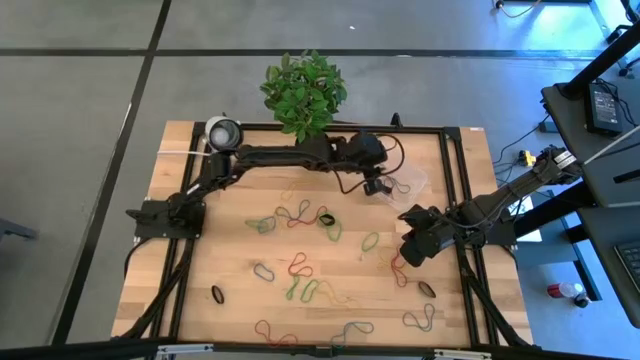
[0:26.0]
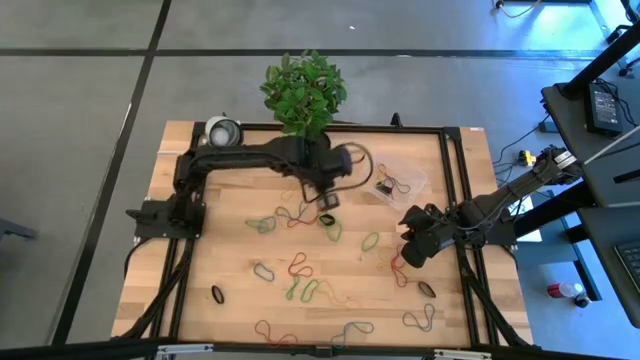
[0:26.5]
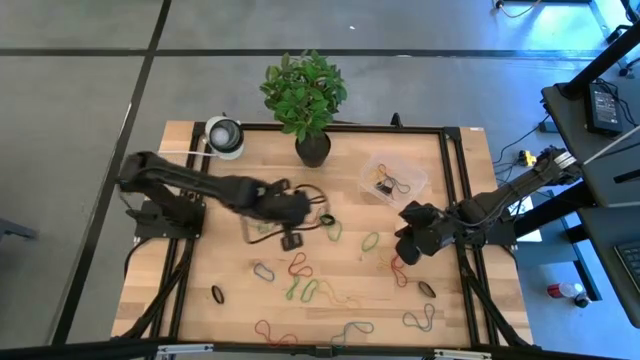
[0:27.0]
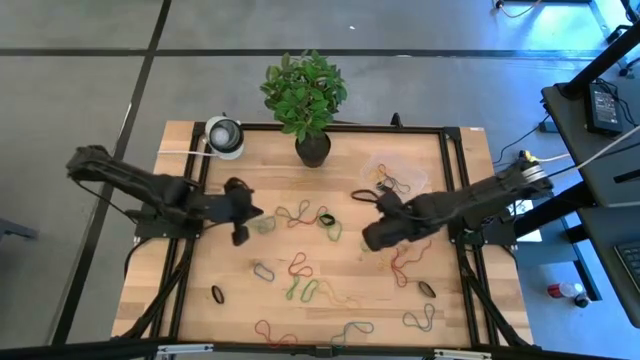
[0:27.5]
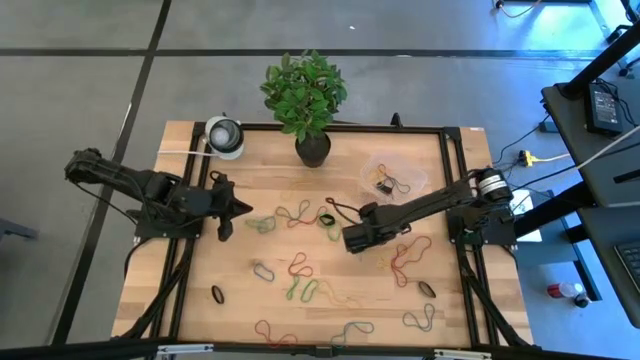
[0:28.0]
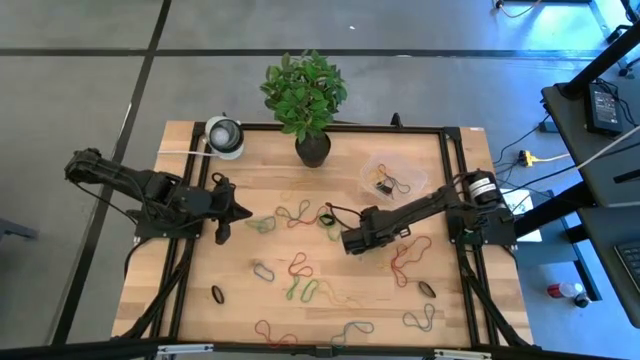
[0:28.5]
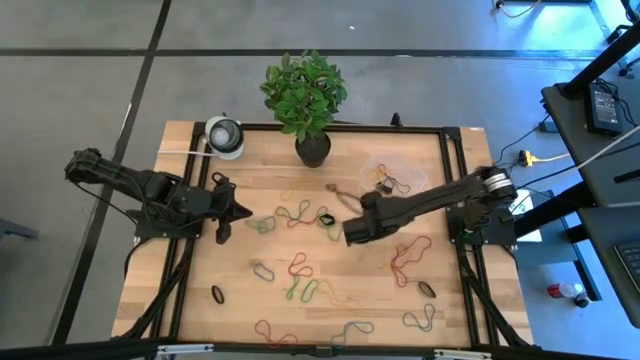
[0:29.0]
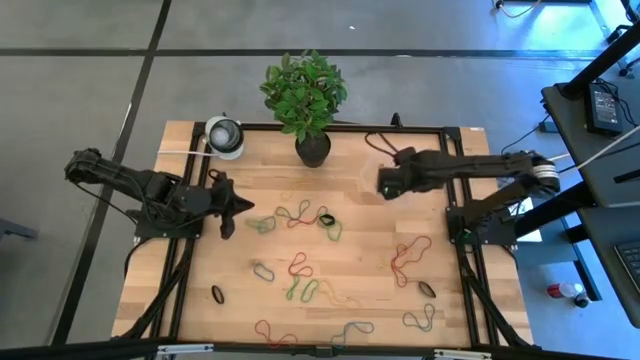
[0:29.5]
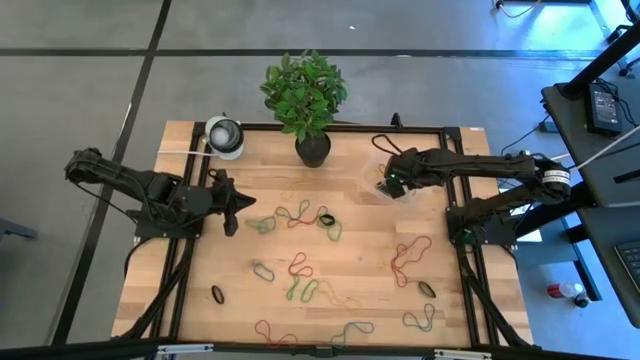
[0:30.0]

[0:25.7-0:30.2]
Task: Pick and place rubber bands into bin
Put the green rubber band into the bin

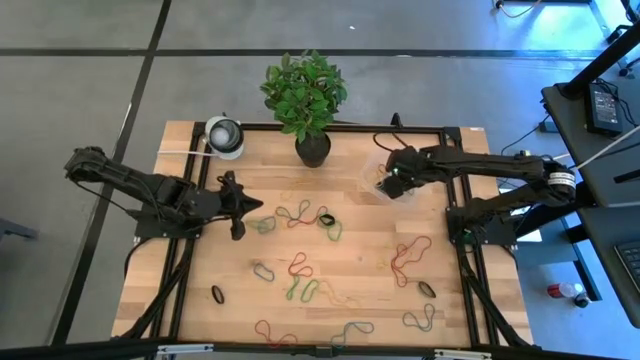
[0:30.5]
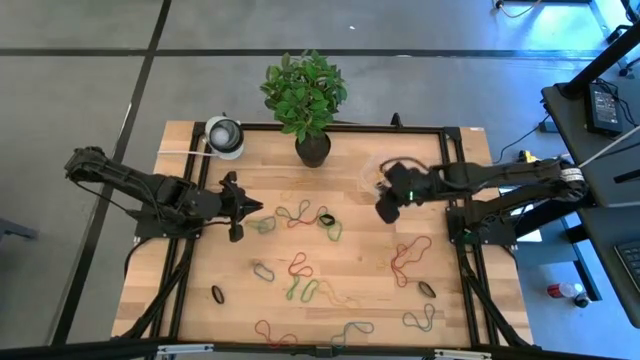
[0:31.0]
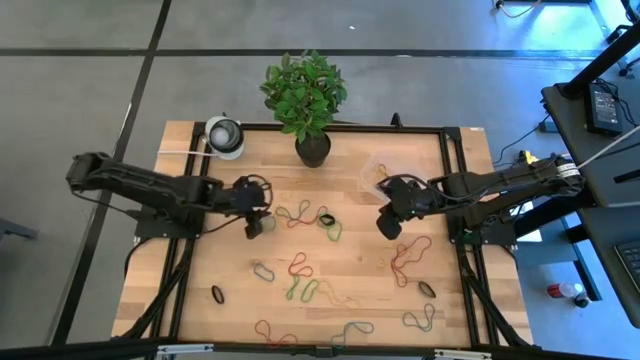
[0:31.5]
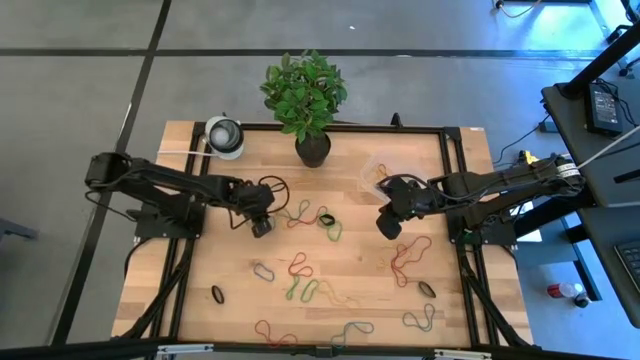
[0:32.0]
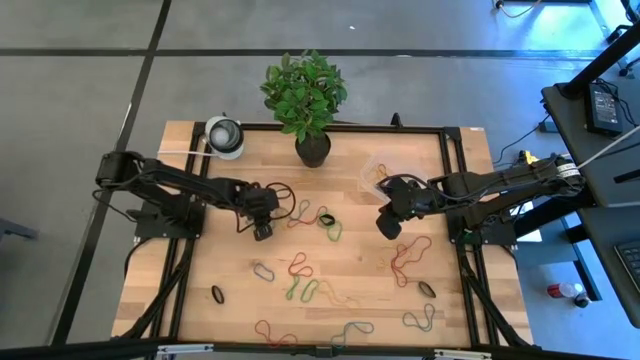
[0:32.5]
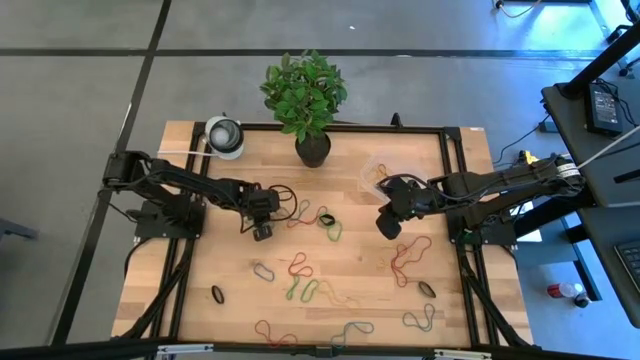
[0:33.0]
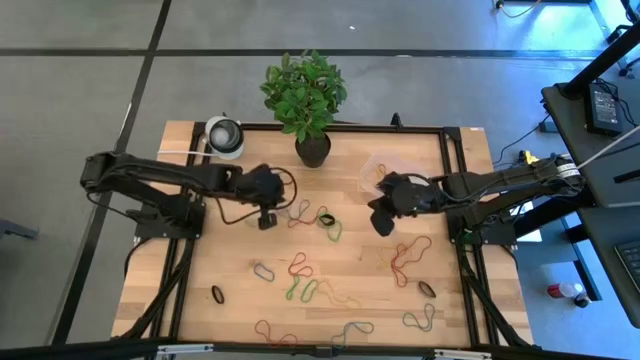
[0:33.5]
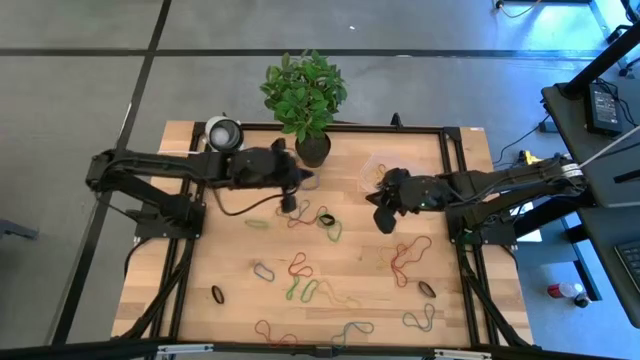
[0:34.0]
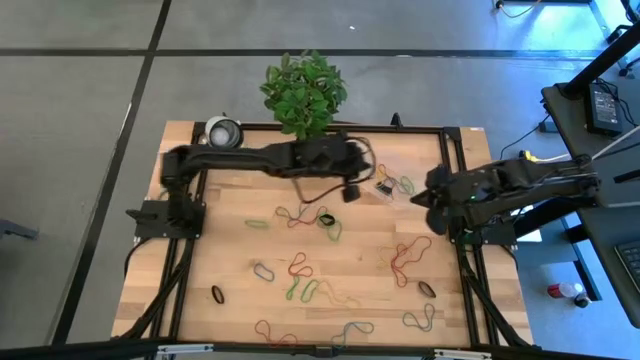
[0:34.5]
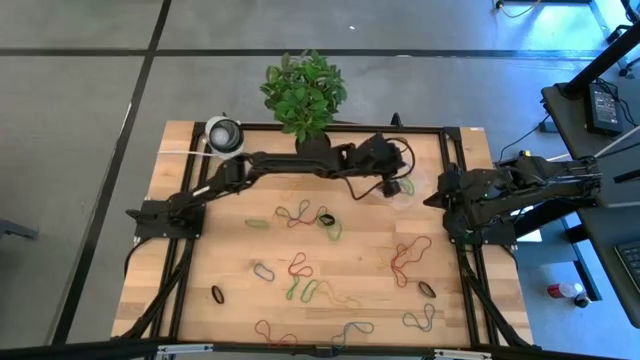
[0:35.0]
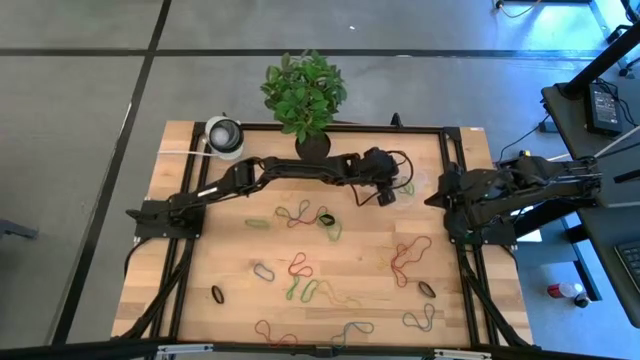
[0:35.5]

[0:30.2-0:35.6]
Put the blue rubber band into the bin

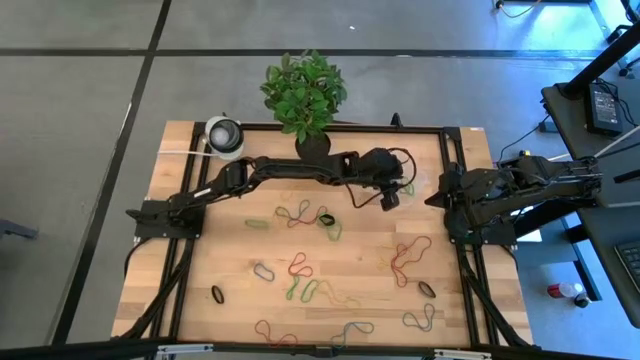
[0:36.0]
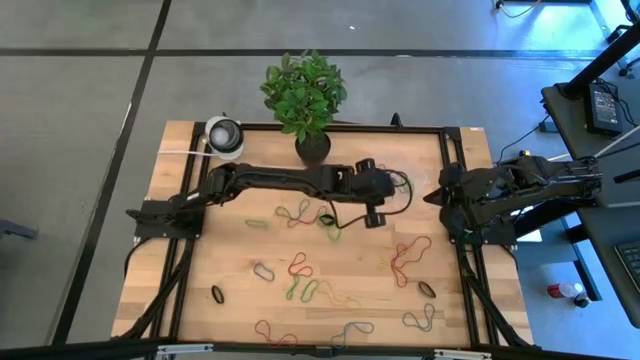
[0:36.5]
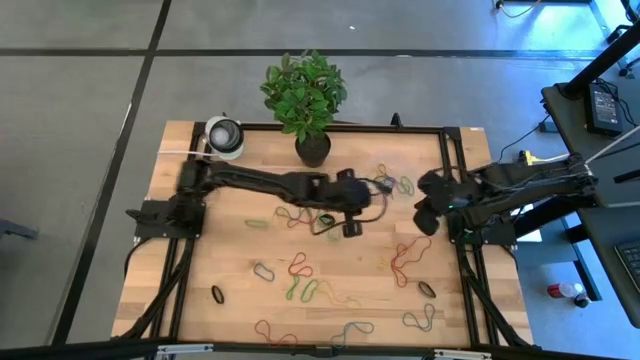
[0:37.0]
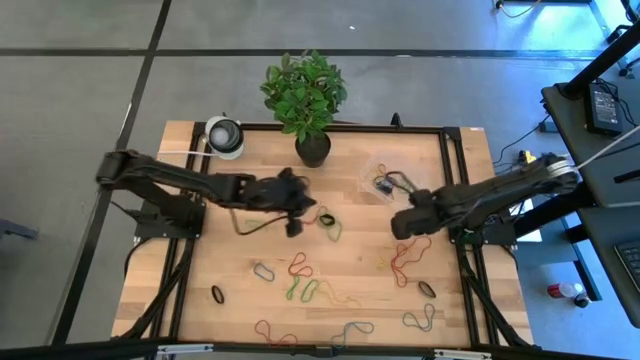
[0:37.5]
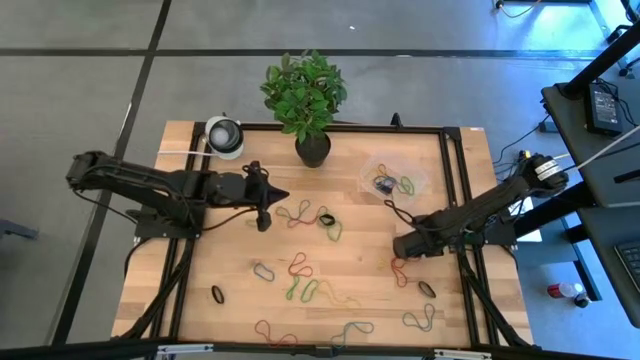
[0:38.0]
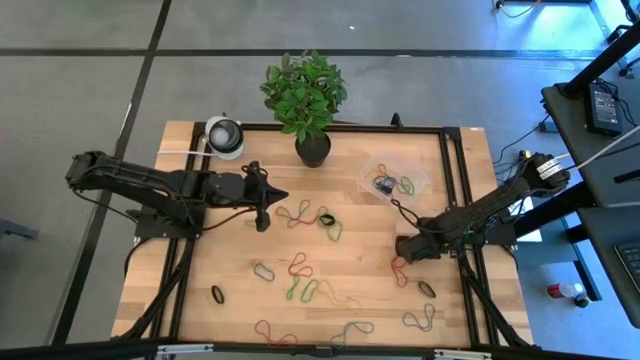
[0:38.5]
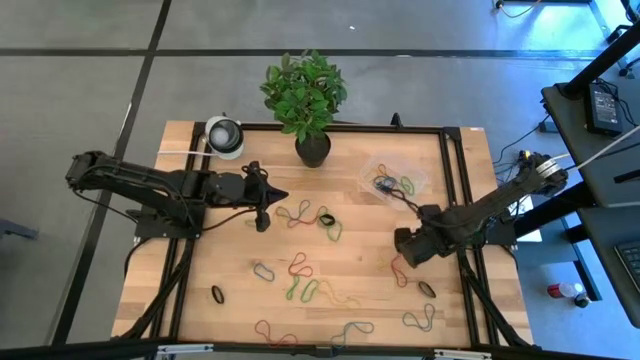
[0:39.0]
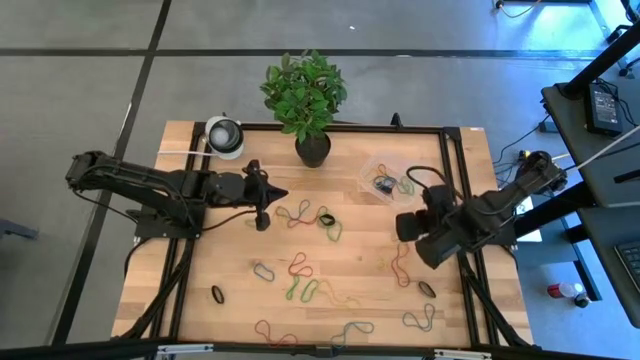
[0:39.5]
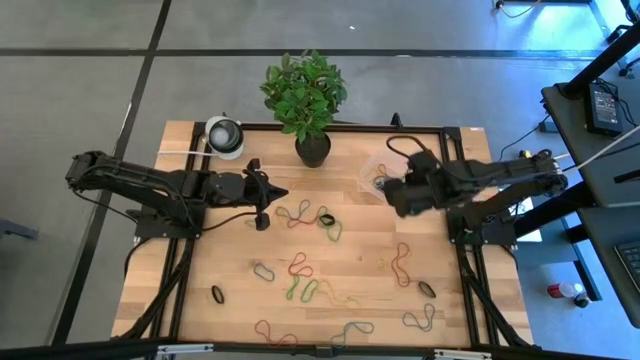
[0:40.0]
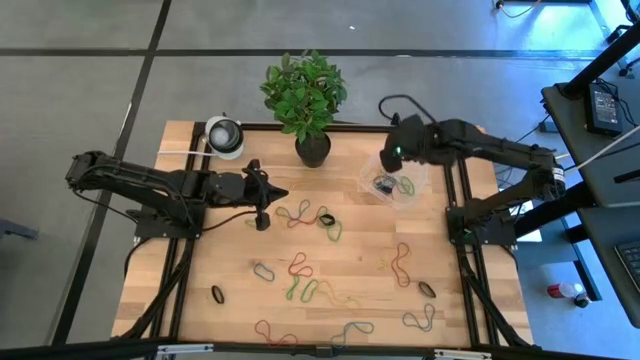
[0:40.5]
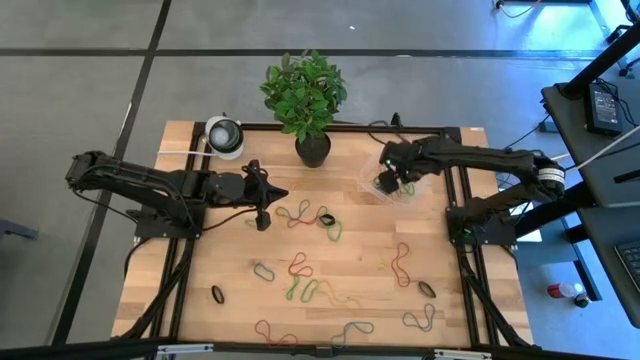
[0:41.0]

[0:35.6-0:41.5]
Put the red rubber band into the bin

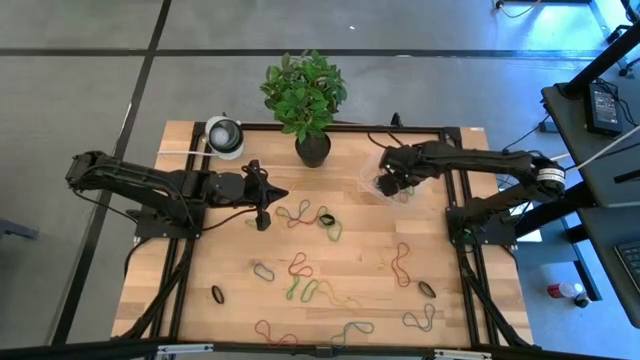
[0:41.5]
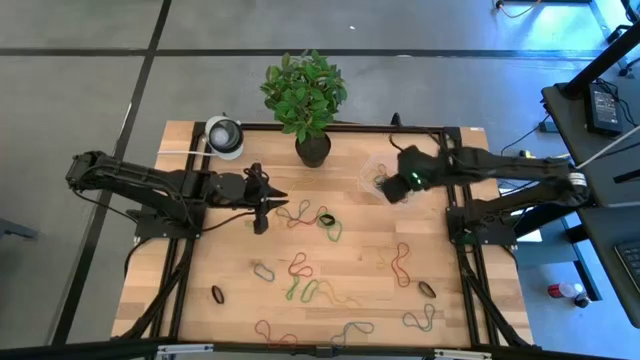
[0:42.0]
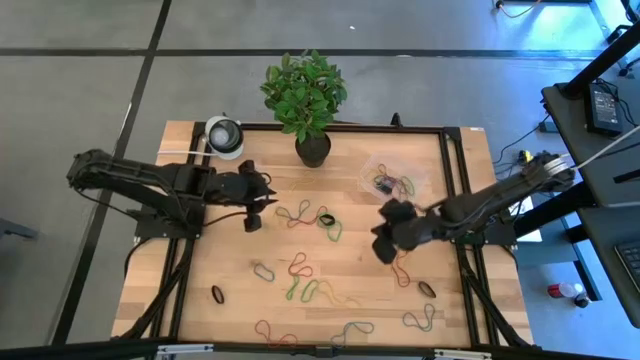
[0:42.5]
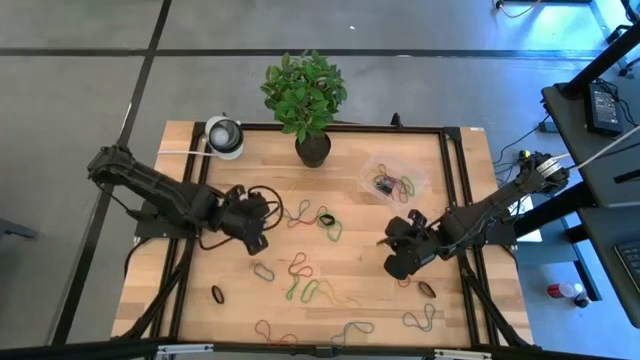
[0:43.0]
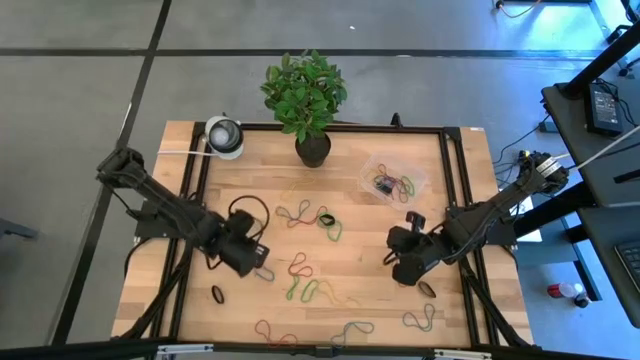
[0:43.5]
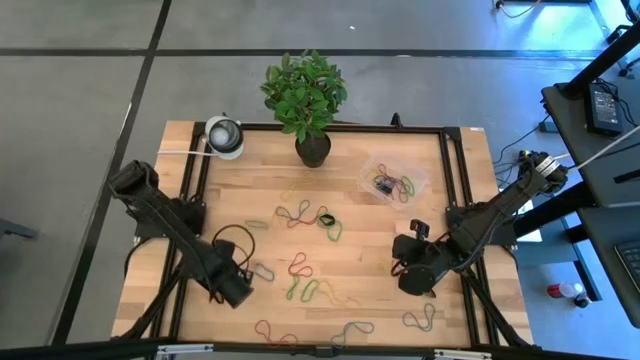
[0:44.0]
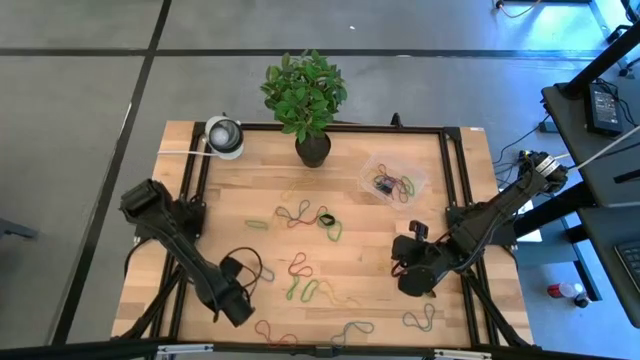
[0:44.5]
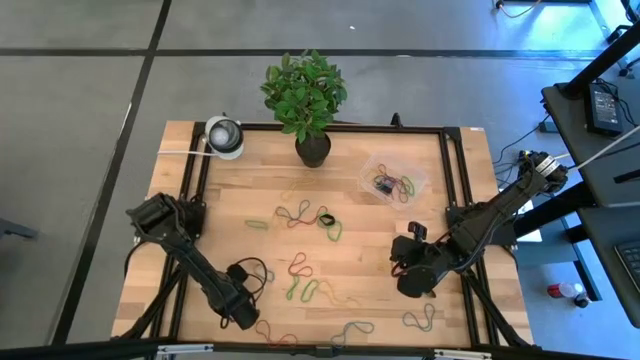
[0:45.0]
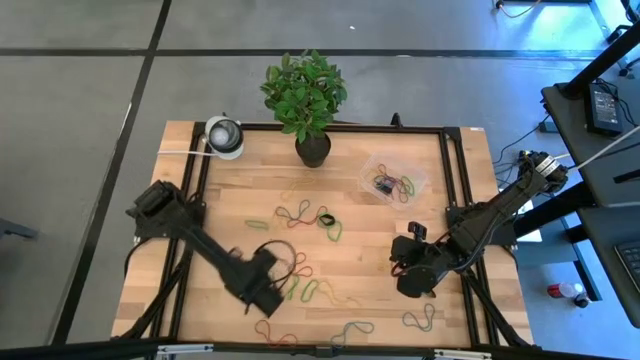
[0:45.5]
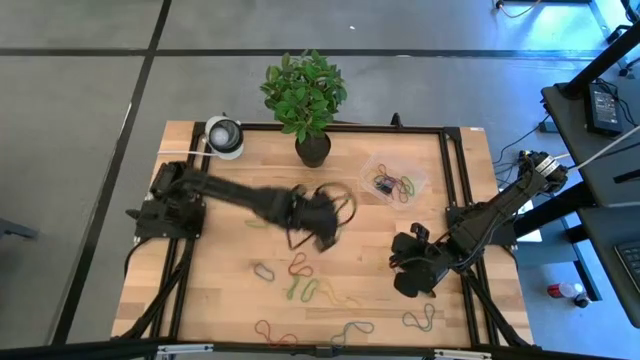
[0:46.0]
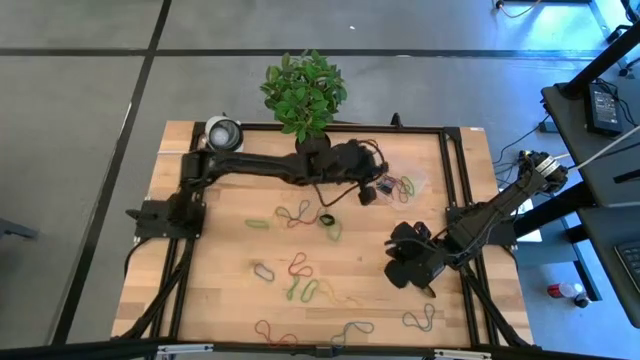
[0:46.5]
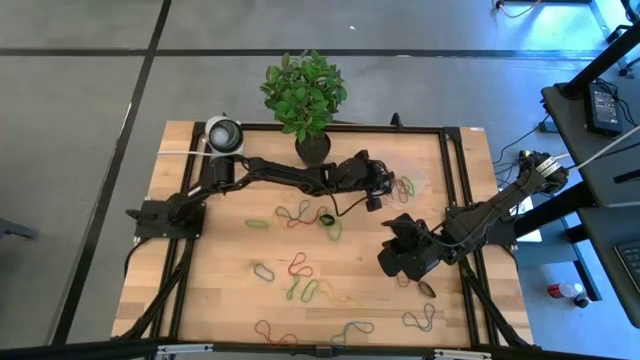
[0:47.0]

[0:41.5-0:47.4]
Put the bottom left black rubber band into the bin
